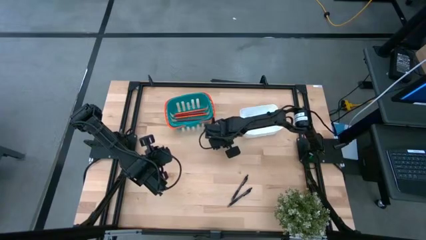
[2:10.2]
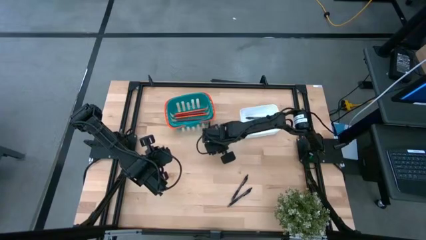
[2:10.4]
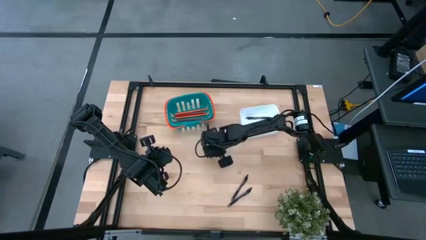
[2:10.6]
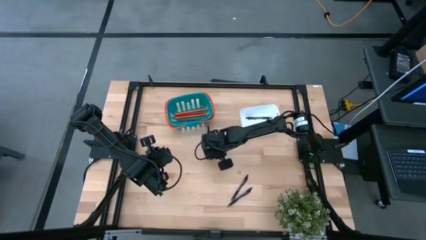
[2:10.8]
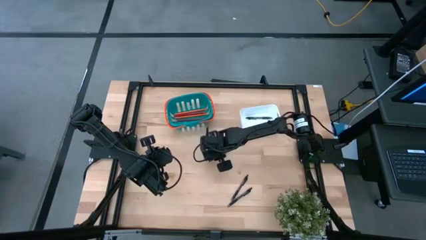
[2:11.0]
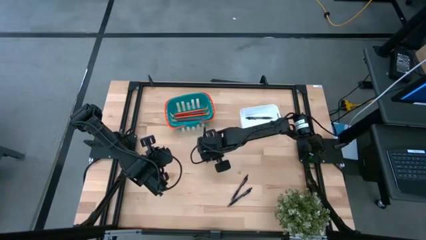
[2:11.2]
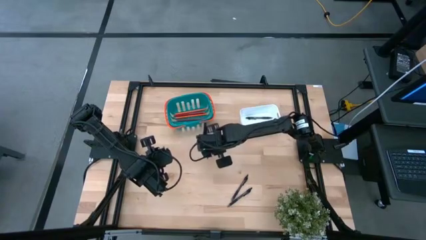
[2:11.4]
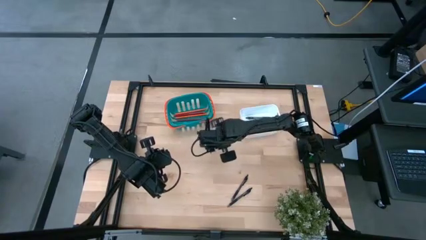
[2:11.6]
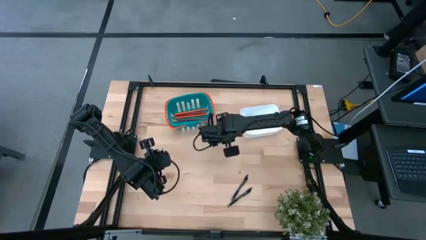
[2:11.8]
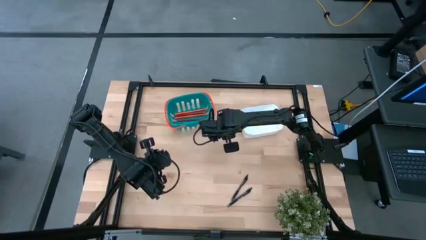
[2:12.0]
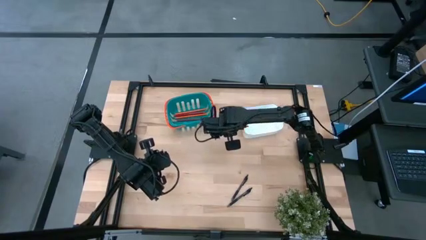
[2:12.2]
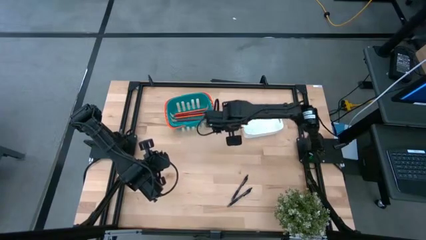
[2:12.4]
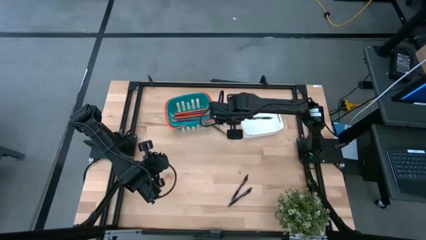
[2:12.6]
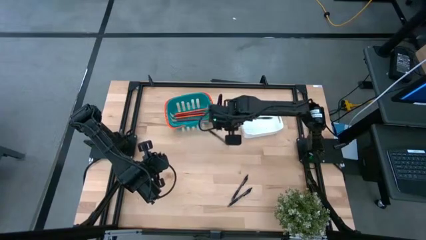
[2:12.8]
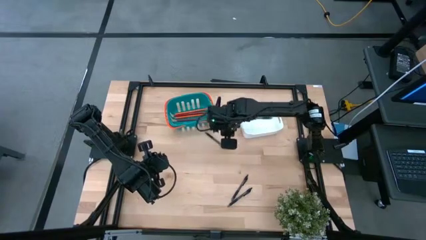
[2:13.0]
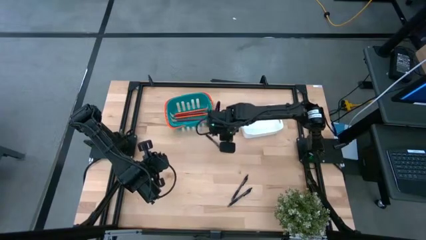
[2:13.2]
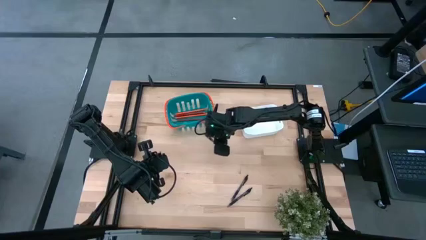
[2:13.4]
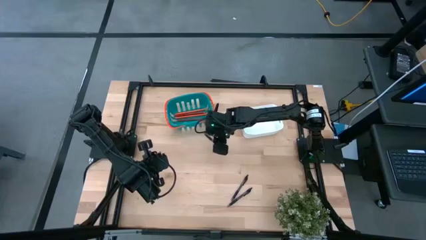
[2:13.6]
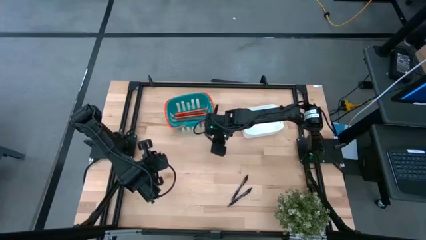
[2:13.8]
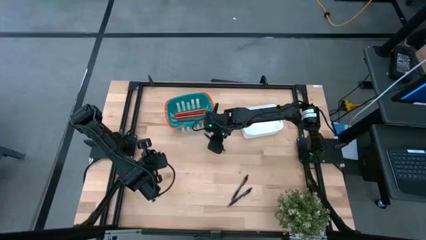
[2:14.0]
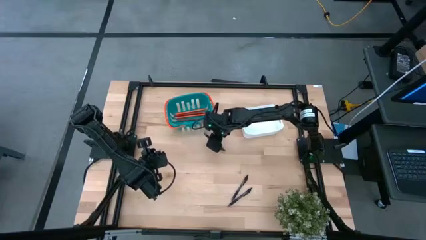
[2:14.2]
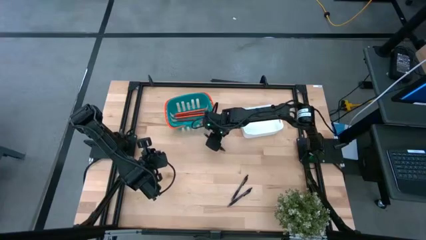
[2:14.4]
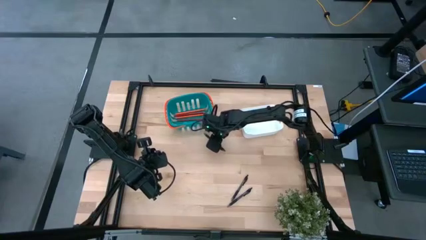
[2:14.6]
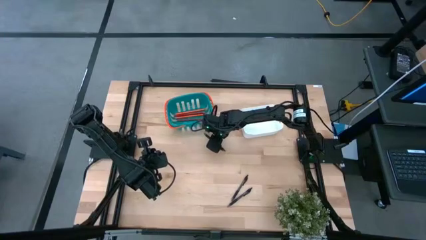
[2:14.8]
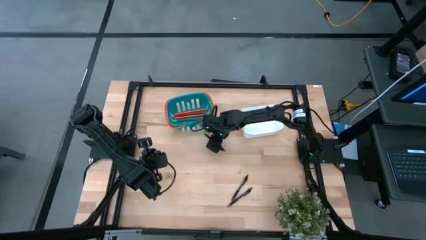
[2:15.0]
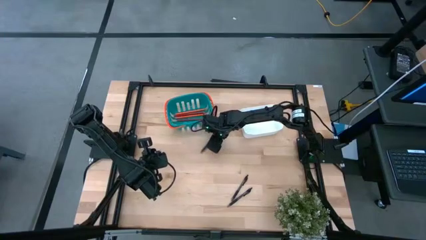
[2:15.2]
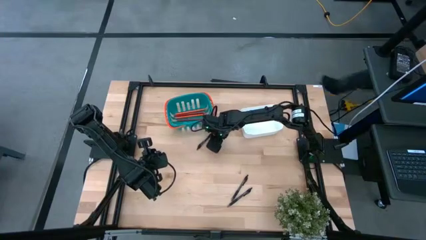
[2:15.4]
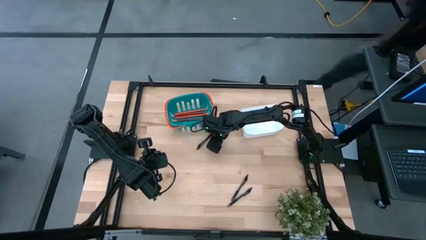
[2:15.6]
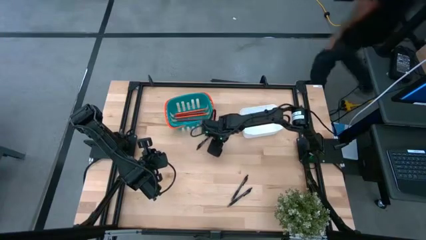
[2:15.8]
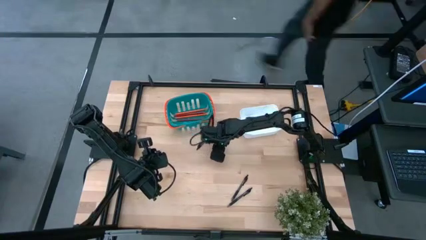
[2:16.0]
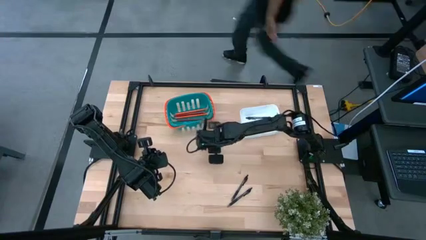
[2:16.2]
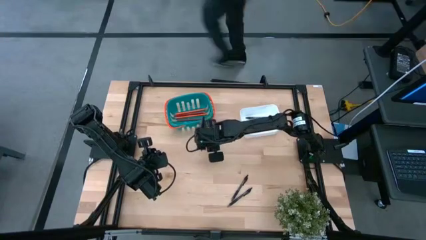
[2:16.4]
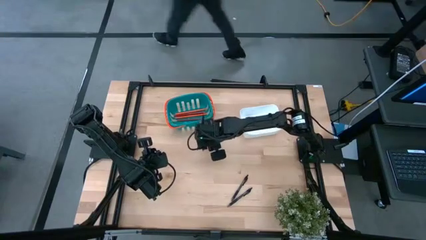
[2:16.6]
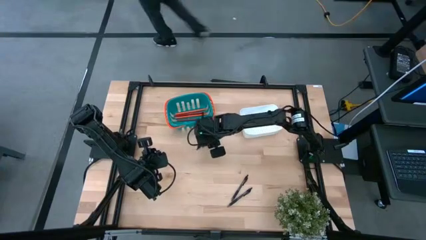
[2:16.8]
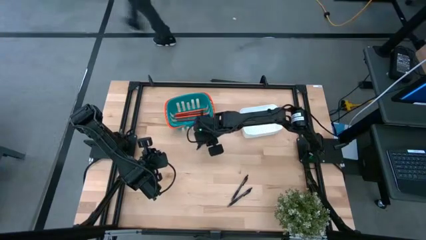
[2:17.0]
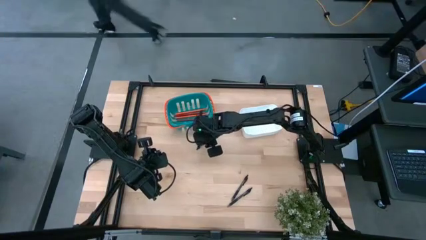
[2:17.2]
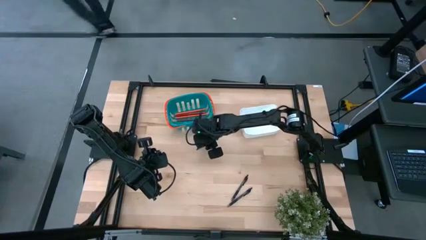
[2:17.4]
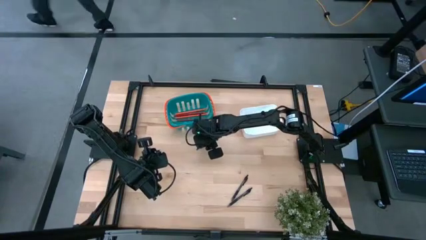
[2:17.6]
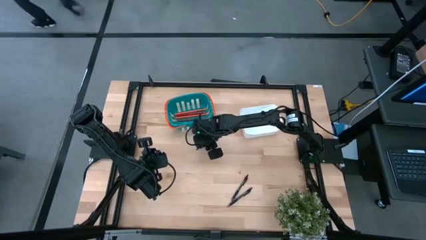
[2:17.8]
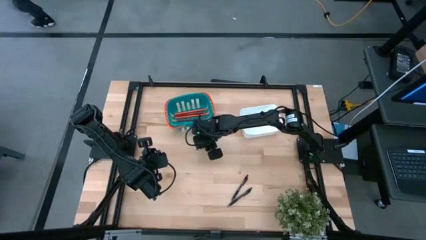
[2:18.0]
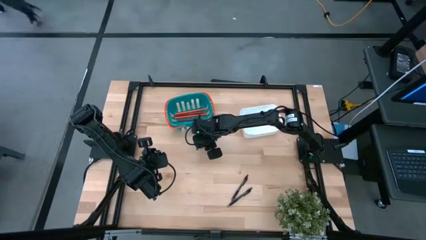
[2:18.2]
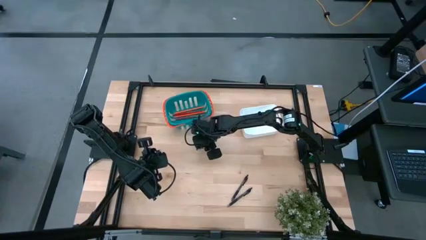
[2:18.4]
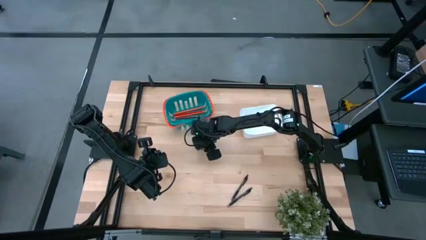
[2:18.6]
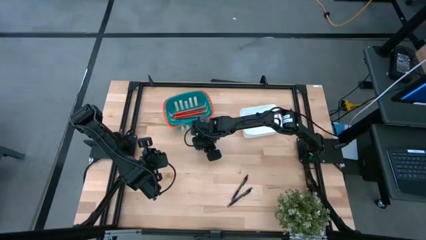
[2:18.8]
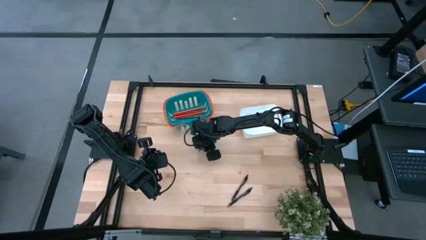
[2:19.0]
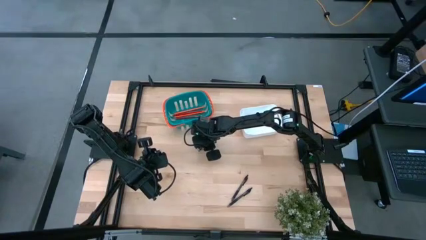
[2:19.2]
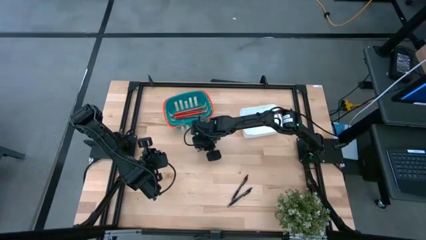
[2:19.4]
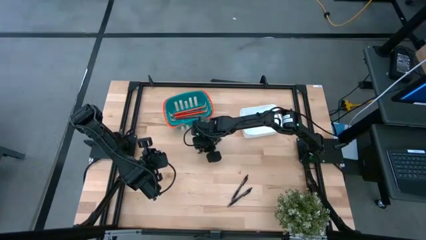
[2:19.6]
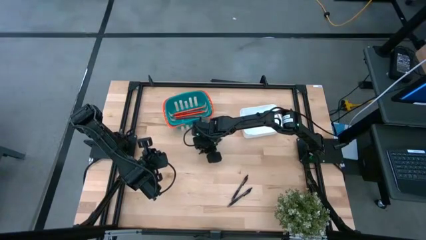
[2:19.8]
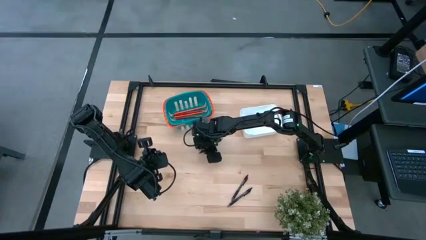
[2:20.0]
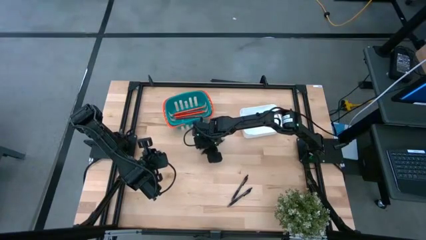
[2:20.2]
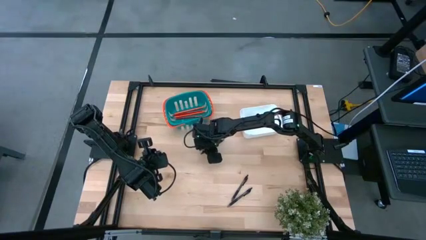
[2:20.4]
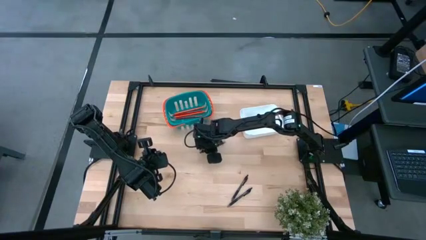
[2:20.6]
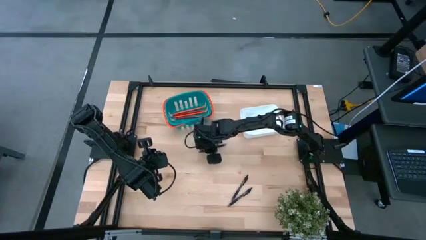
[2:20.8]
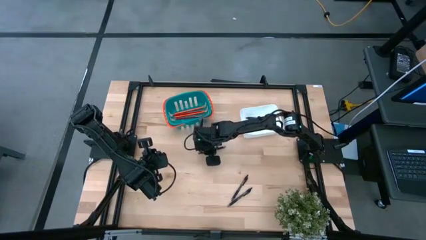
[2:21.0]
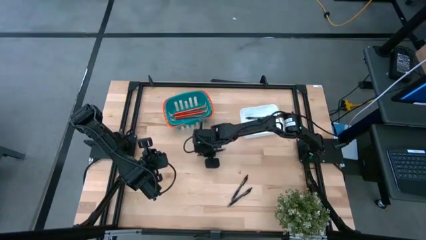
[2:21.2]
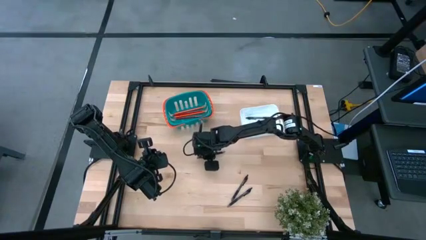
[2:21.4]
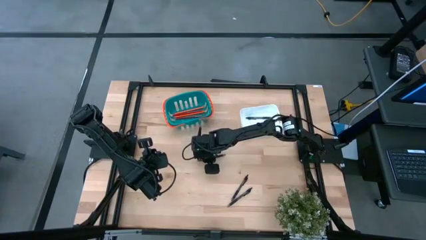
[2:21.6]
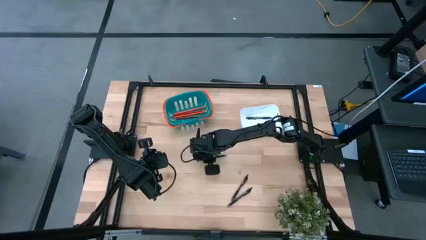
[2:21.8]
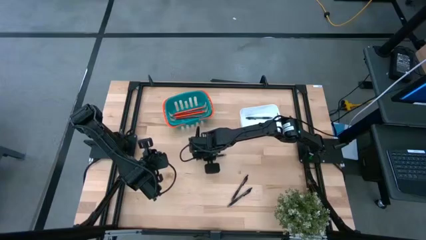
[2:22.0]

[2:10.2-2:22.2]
Task: Sort pens & pencils
Put the black pen into the white bin

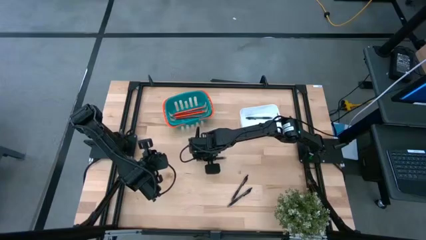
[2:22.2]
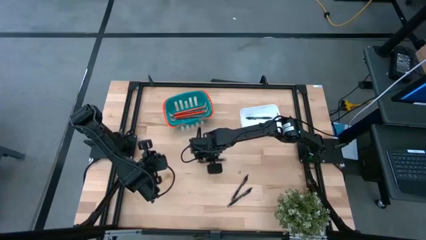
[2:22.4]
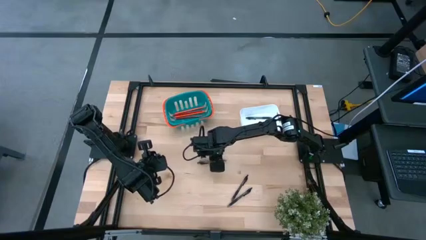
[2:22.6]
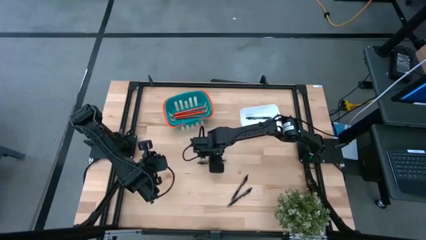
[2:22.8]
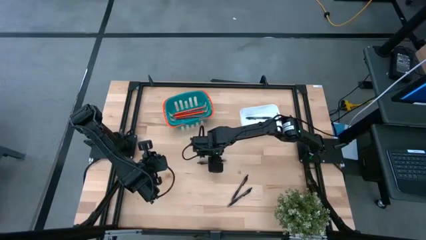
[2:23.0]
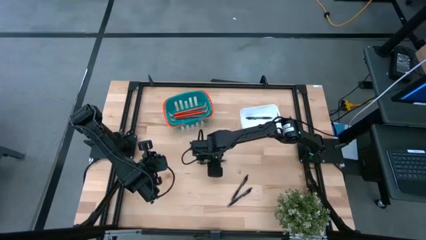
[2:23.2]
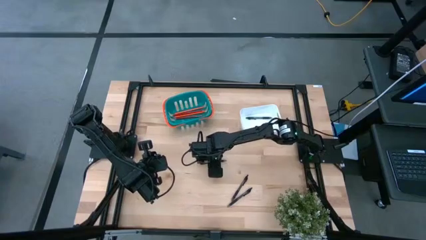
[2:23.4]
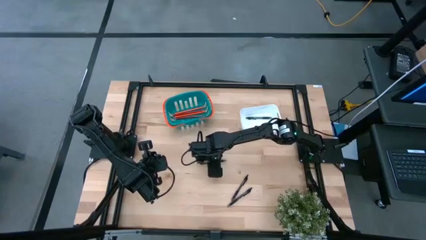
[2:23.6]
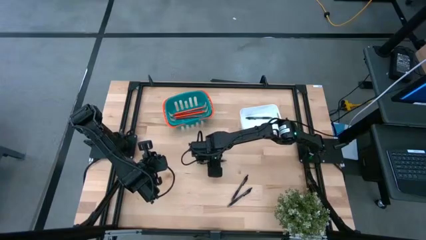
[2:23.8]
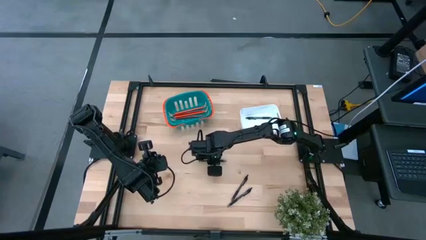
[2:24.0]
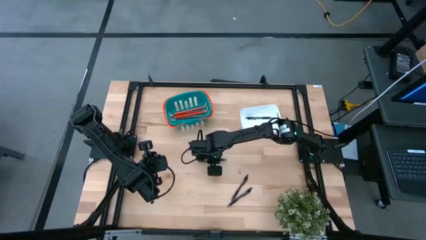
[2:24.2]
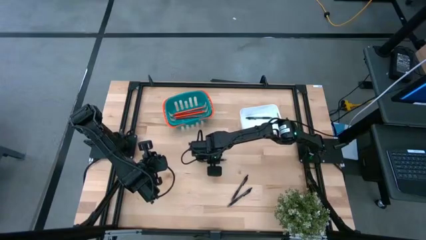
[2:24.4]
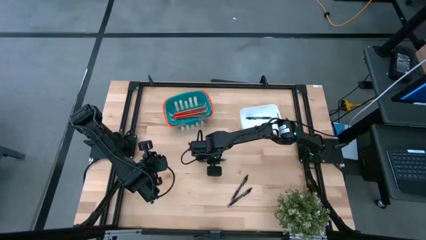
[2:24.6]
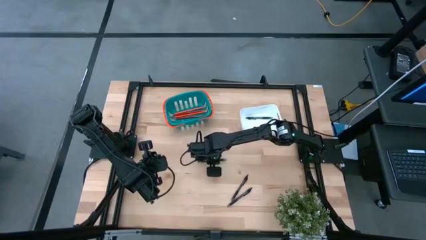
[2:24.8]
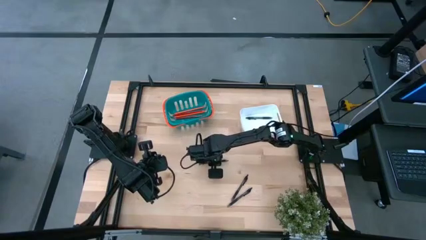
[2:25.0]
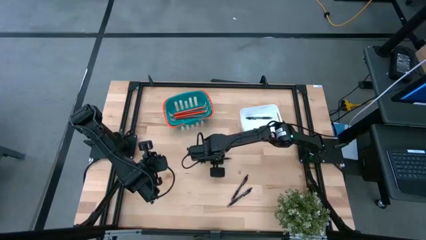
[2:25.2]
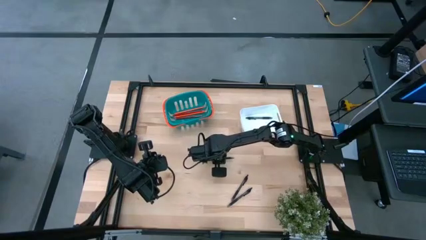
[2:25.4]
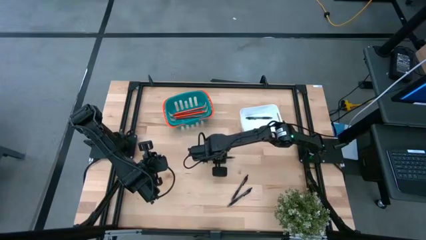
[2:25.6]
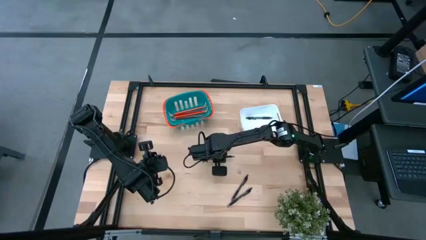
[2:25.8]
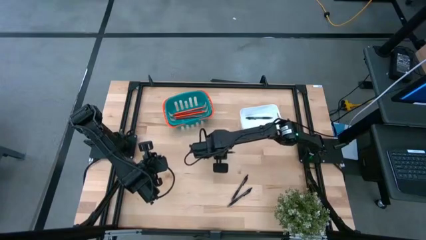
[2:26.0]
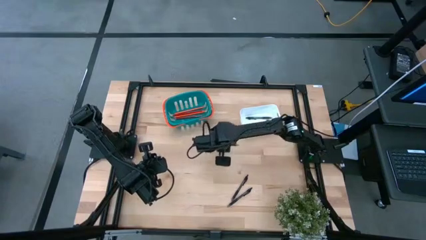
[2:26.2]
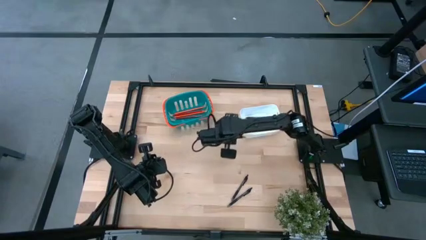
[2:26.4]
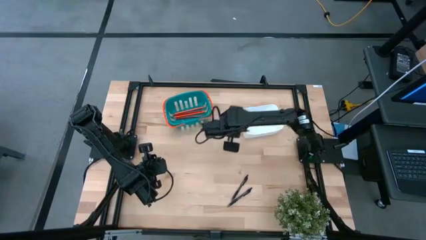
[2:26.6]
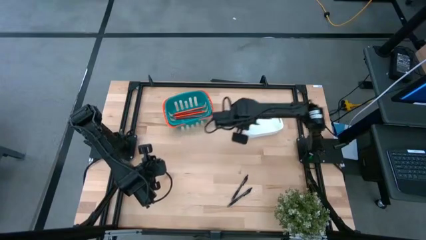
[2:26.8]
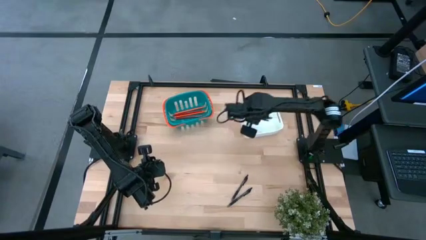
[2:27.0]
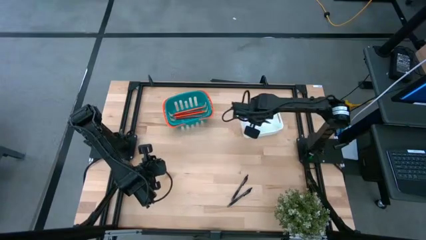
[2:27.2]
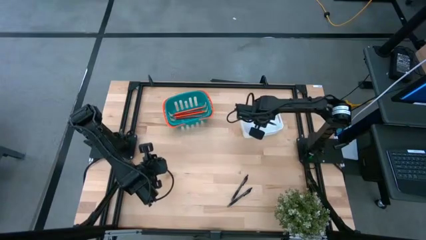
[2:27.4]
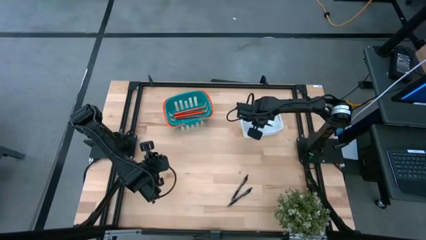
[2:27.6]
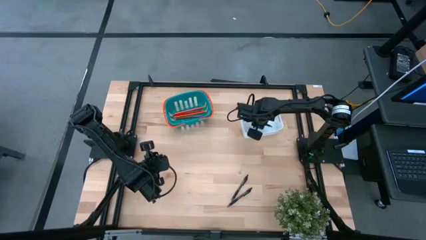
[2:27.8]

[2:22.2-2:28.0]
Put the black pen into the white bin
